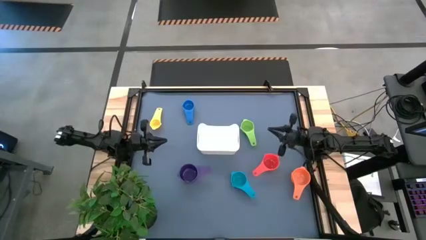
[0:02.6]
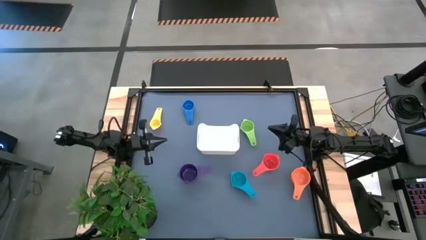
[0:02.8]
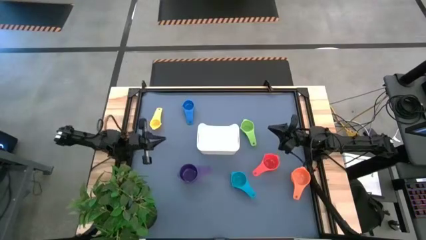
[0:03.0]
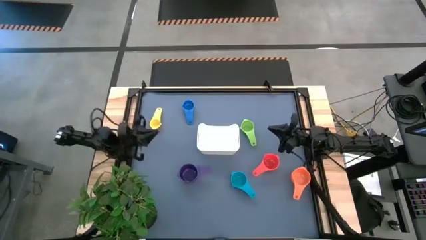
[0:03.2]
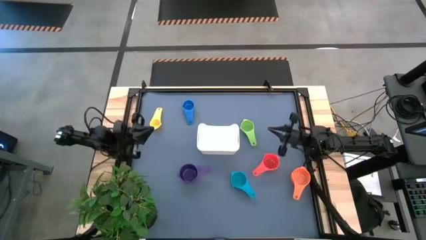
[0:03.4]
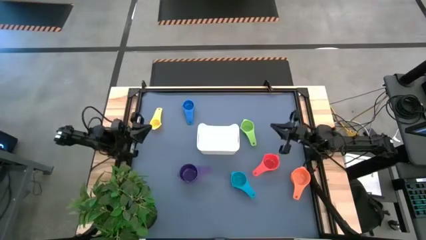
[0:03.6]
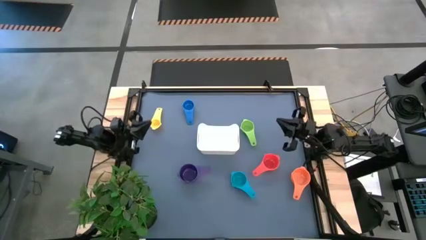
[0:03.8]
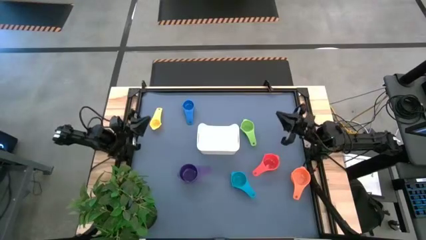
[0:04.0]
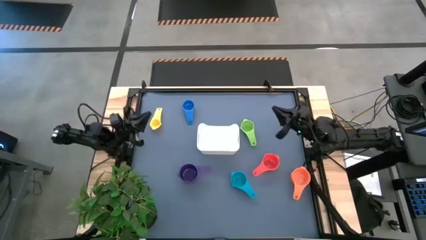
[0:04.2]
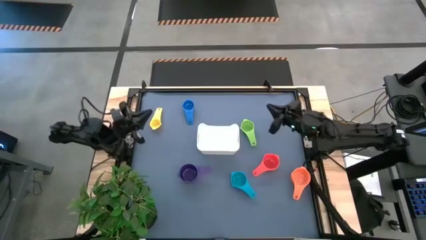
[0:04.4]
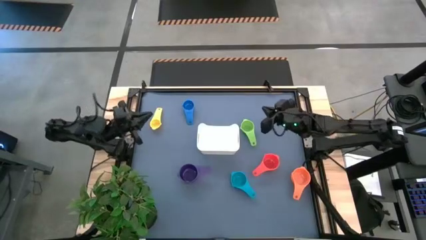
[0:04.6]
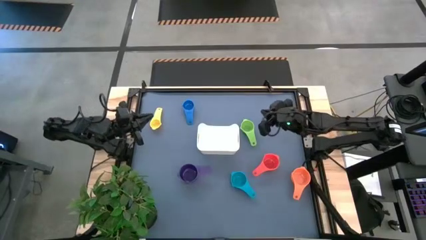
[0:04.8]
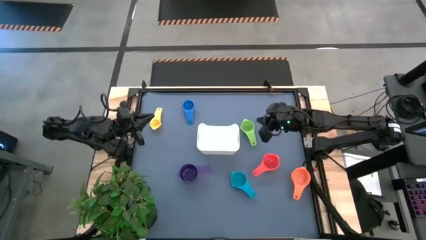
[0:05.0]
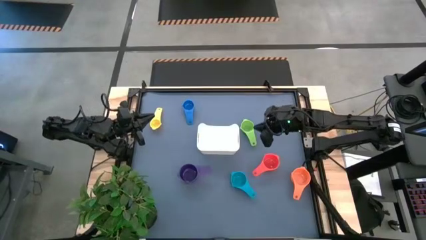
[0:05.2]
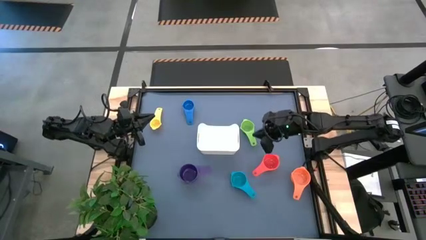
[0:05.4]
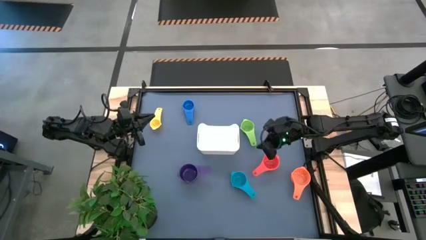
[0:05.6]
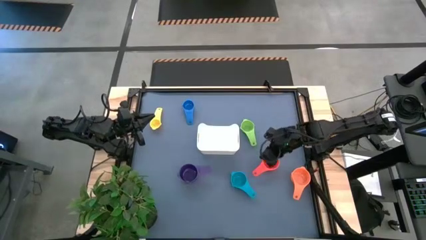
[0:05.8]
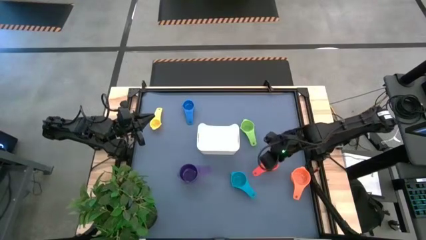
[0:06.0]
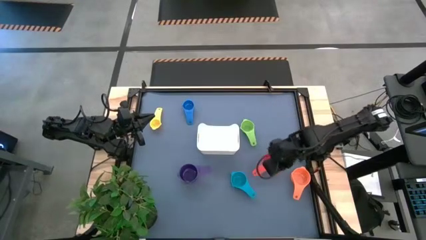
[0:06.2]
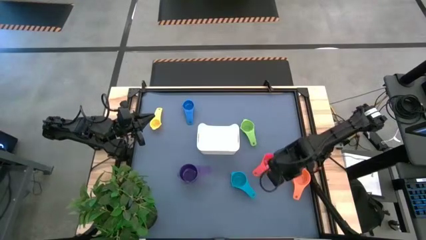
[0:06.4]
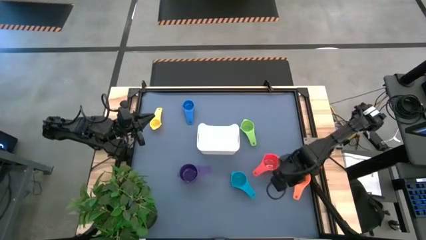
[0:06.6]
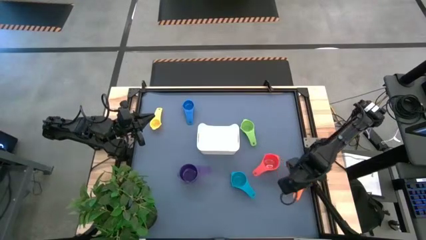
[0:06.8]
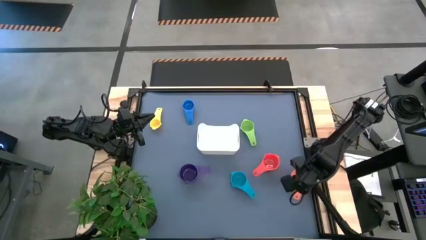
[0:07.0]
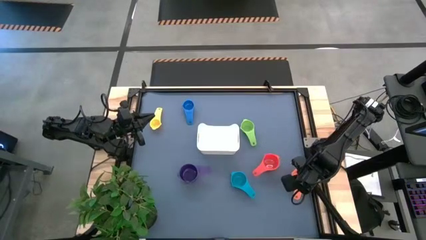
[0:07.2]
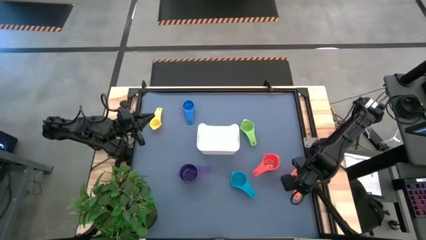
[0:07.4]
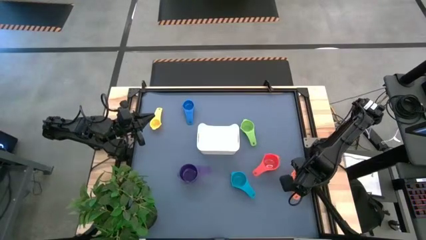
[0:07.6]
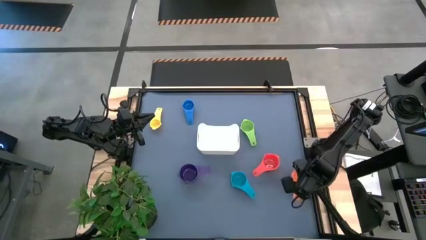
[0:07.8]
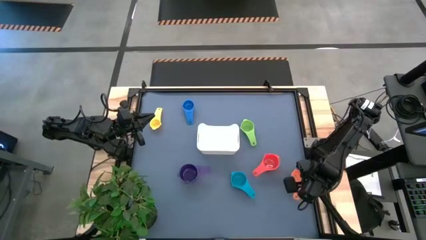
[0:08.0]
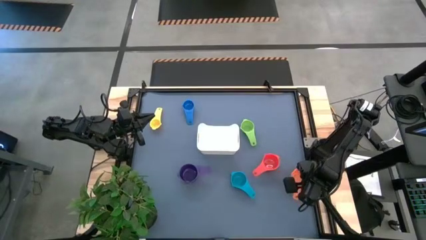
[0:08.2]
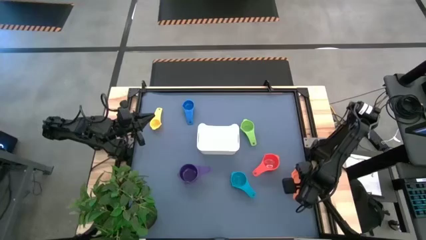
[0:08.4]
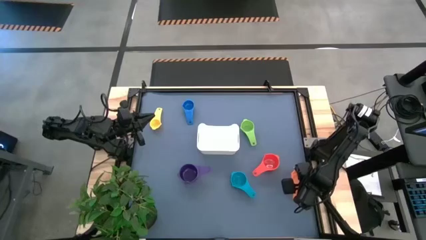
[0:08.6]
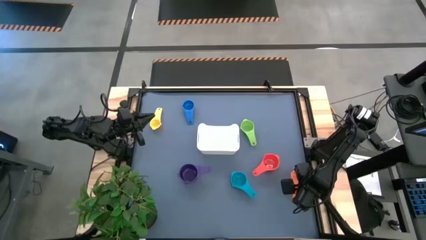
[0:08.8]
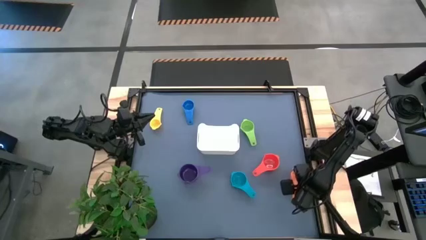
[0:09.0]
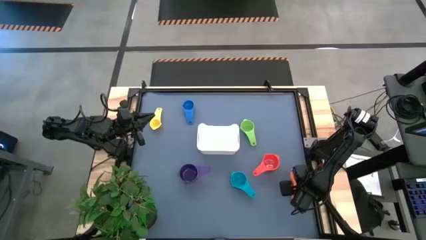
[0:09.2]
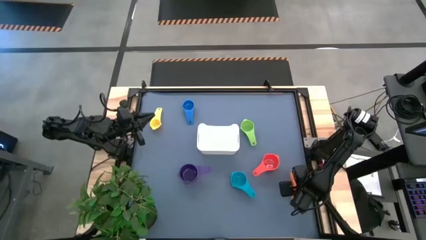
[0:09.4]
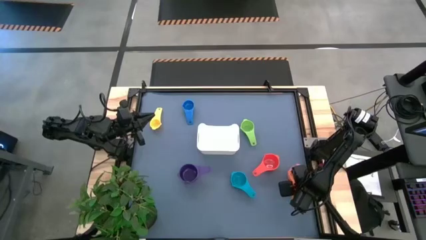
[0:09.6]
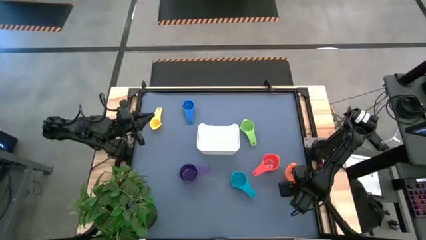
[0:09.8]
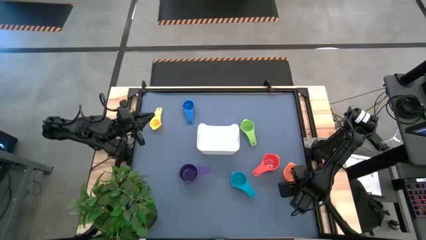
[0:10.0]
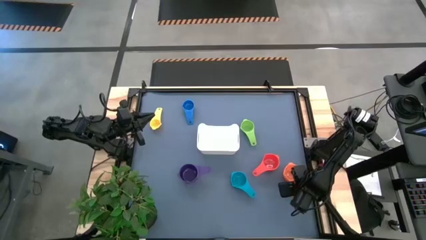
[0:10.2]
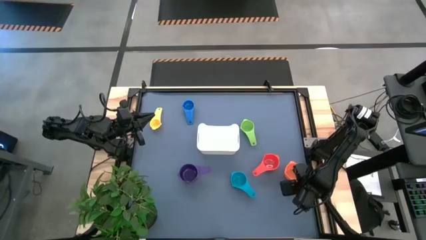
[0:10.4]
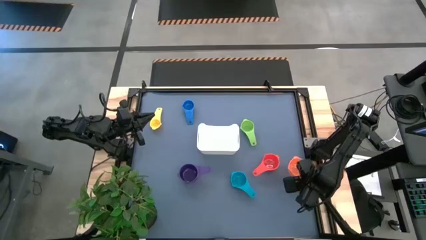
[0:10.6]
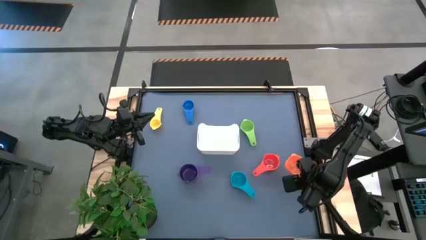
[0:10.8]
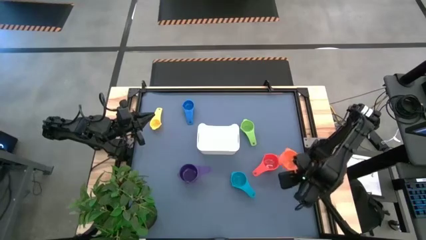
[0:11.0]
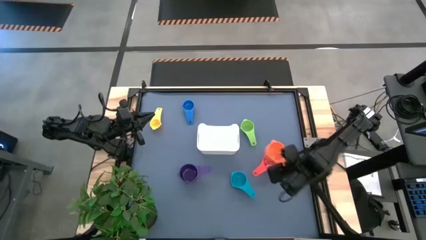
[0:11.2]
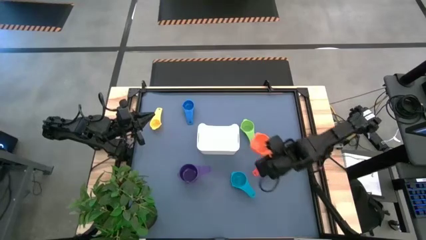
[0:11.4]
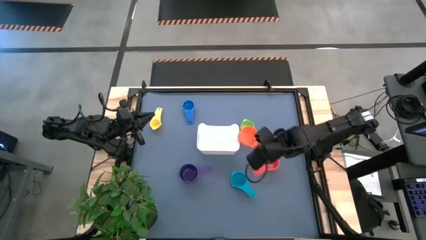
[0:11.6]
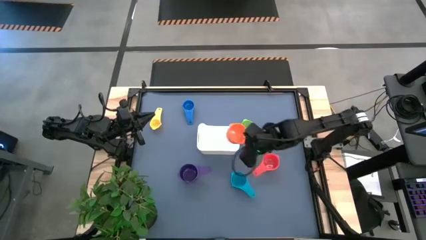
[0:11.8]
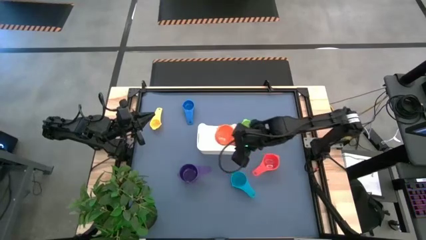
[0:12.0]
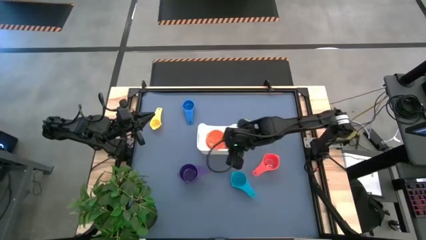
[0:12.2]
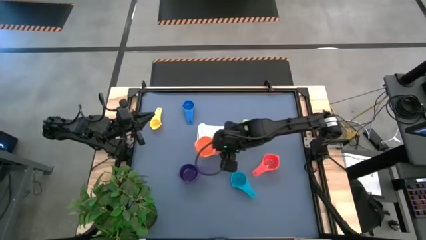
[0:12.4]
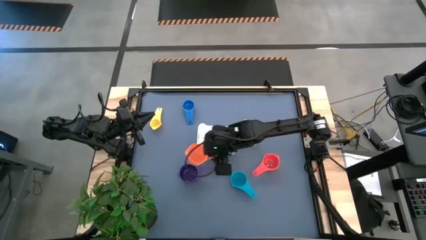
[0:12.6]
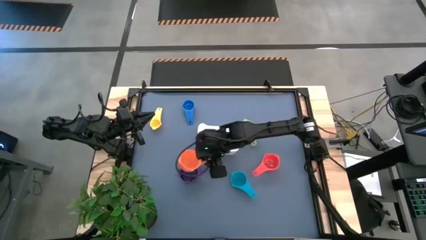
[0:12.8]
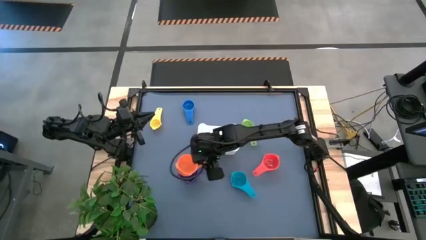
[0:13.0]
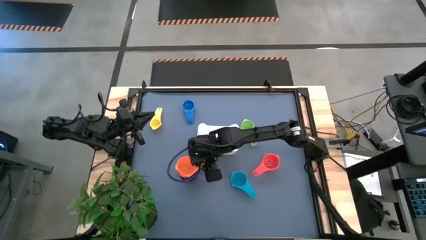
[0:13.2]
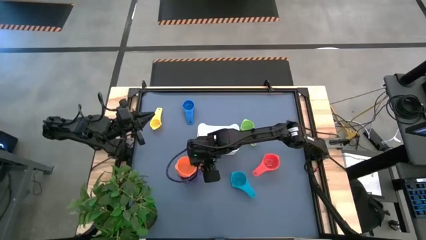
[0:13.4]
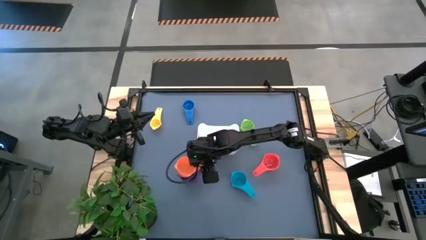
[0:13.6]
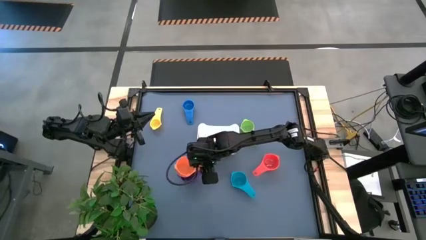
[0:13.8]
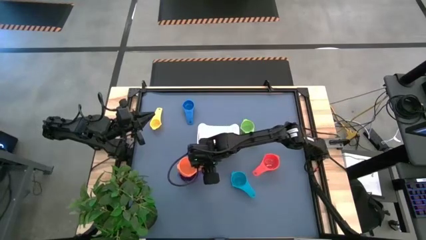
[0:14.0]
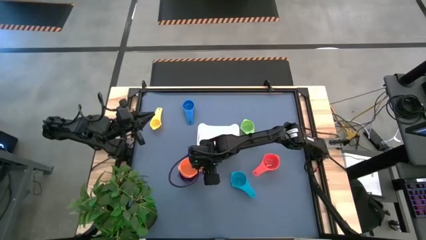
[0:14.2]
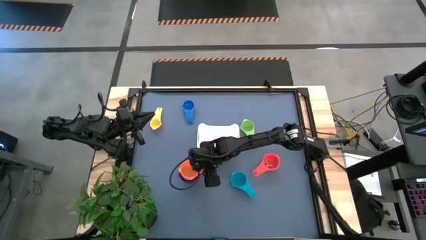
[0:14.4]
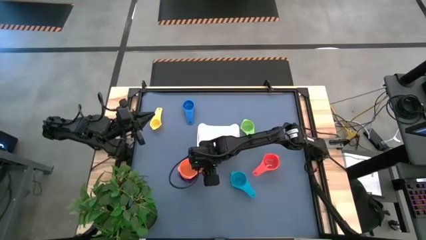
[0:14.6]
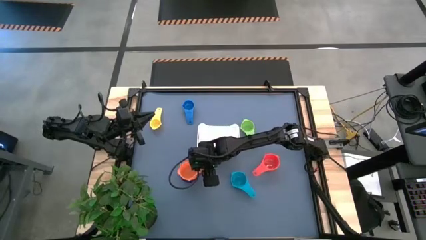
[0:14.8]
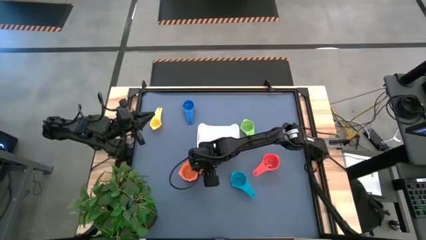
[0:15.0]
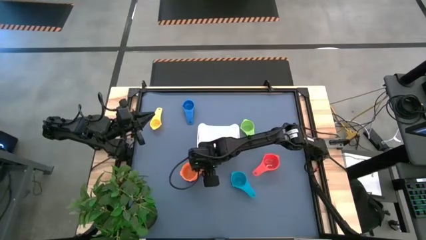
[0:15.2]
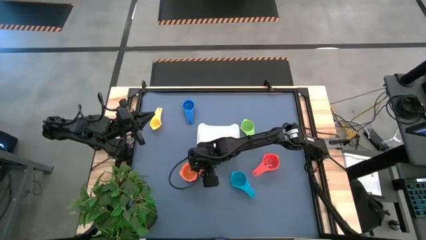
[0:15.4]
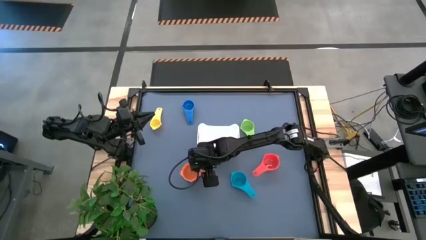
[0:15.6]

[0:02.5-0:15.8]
Task: Nest measuring cups in basket
Stack the orange measuring cup on the purple measuring cup
